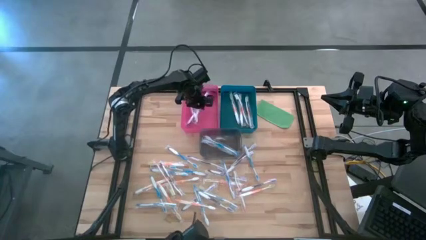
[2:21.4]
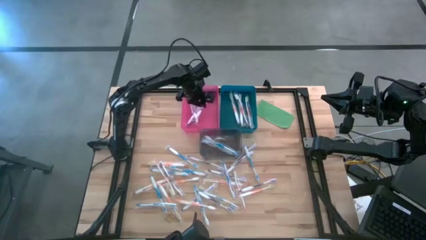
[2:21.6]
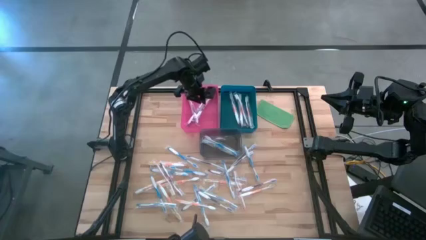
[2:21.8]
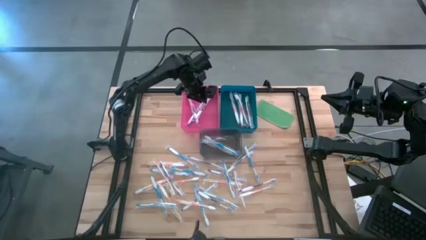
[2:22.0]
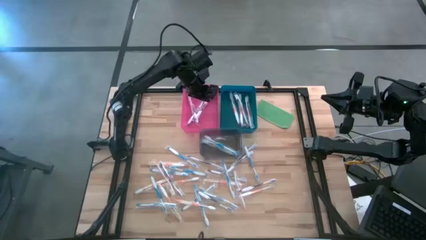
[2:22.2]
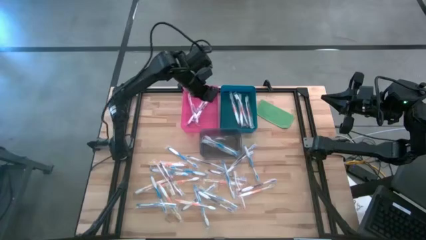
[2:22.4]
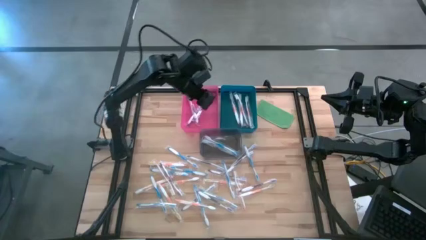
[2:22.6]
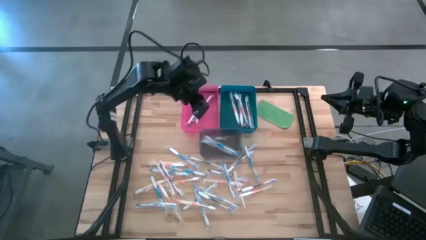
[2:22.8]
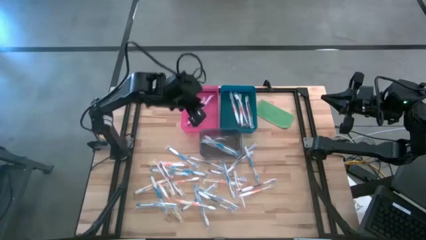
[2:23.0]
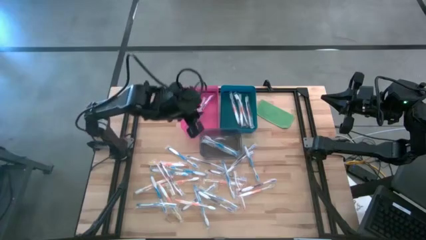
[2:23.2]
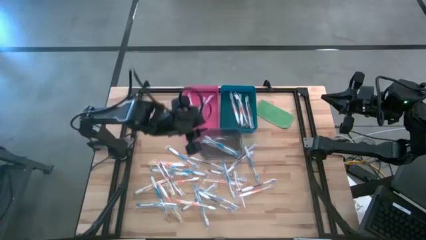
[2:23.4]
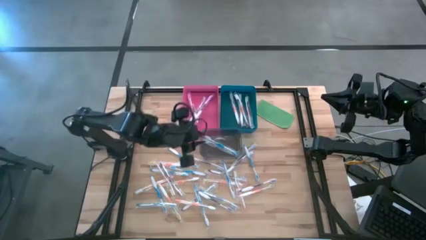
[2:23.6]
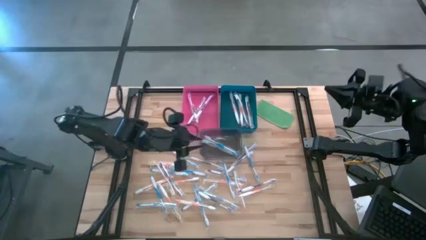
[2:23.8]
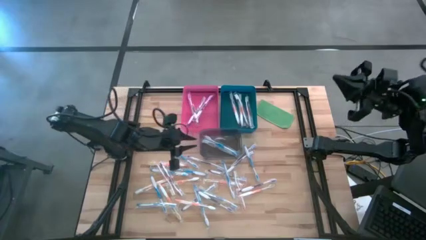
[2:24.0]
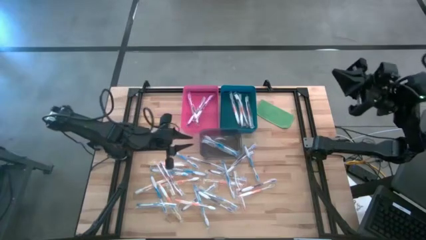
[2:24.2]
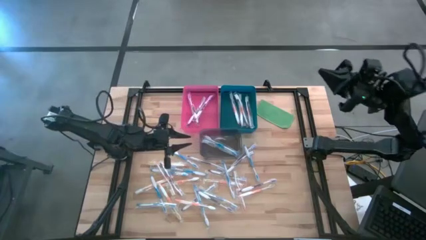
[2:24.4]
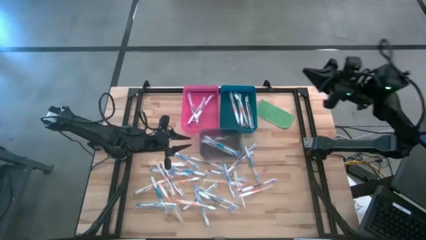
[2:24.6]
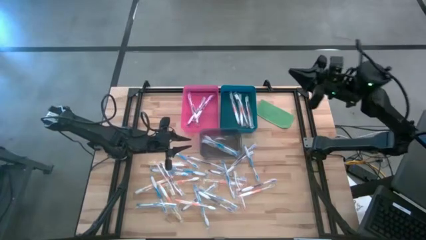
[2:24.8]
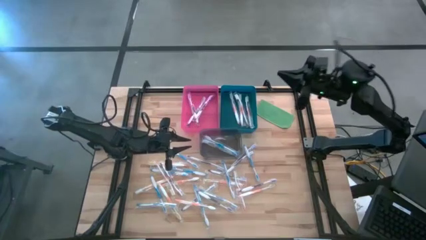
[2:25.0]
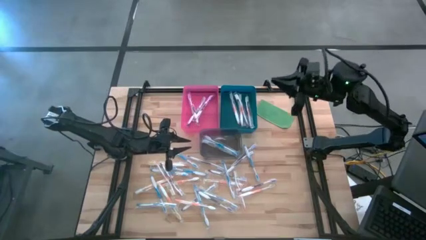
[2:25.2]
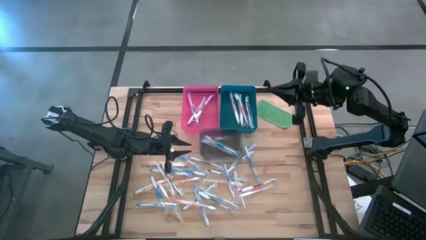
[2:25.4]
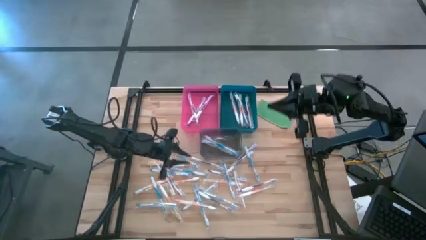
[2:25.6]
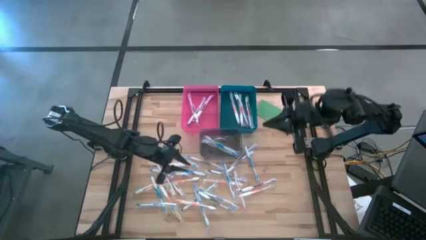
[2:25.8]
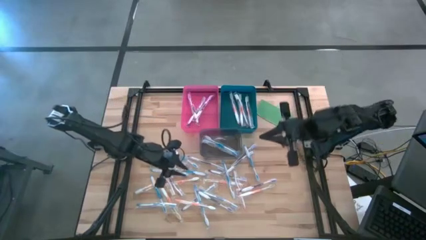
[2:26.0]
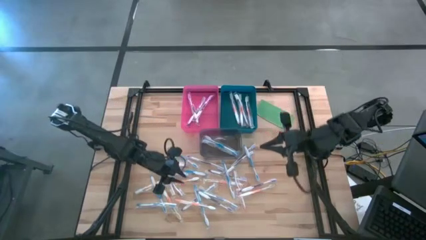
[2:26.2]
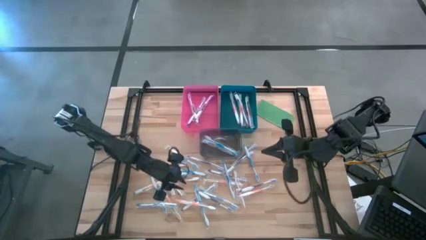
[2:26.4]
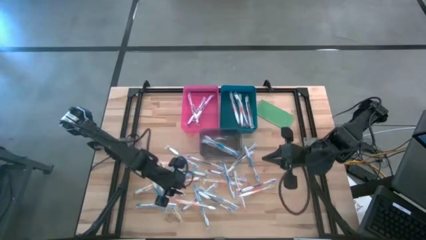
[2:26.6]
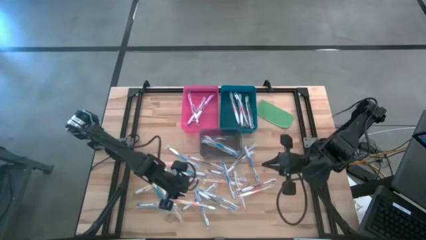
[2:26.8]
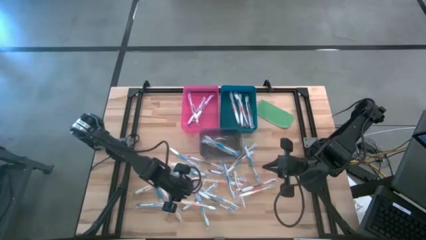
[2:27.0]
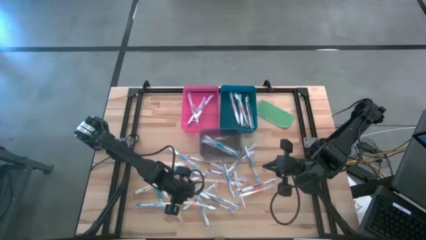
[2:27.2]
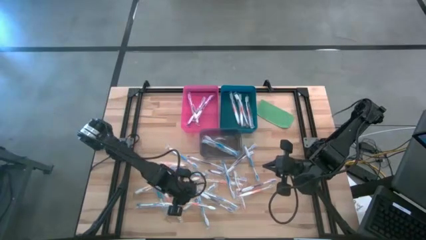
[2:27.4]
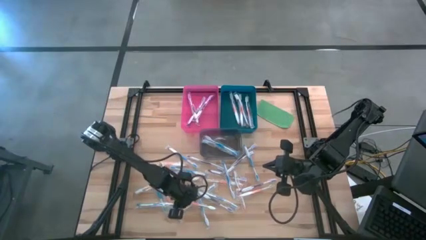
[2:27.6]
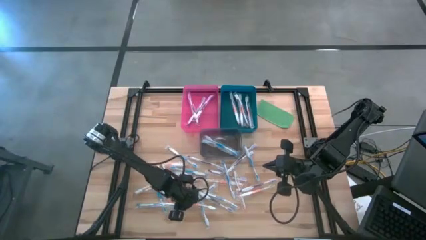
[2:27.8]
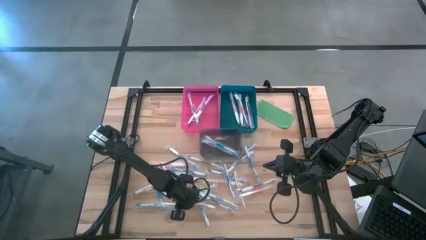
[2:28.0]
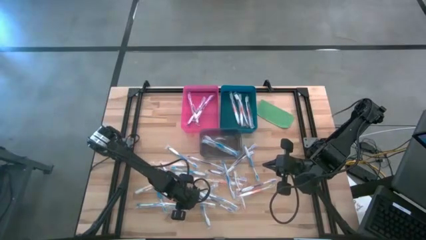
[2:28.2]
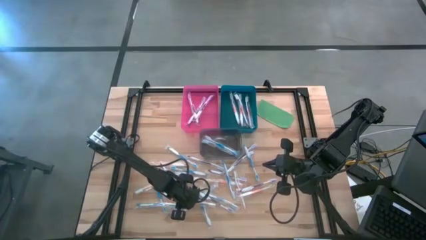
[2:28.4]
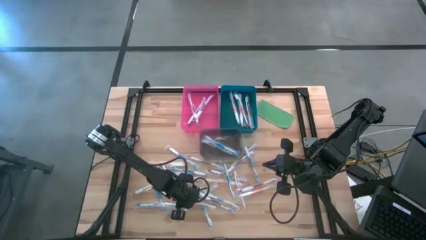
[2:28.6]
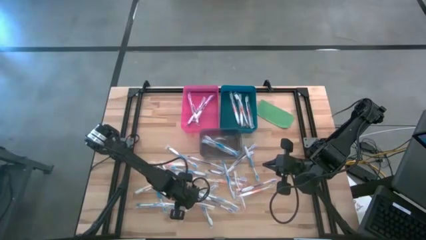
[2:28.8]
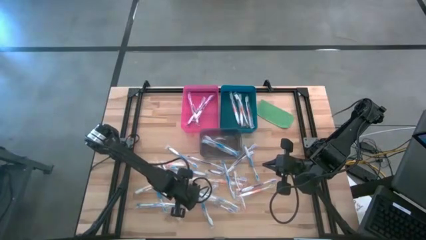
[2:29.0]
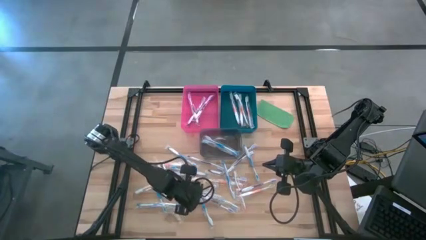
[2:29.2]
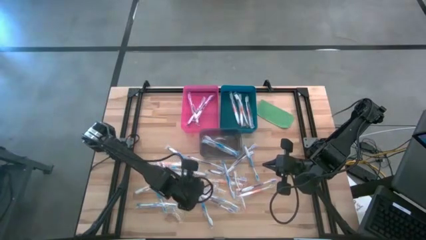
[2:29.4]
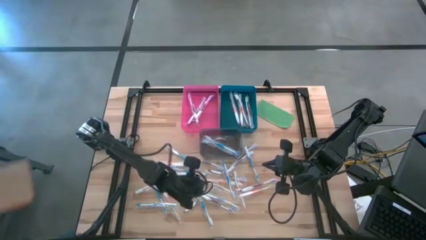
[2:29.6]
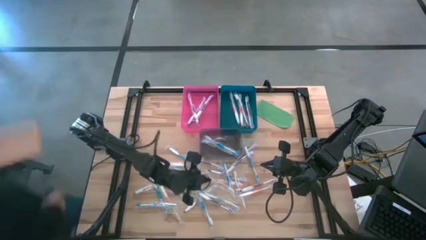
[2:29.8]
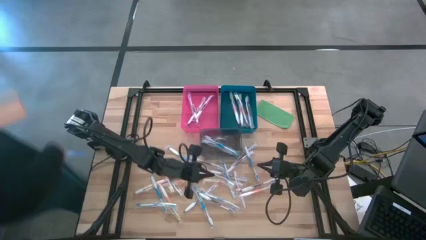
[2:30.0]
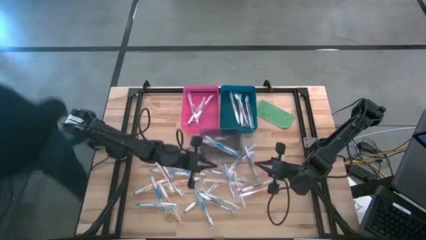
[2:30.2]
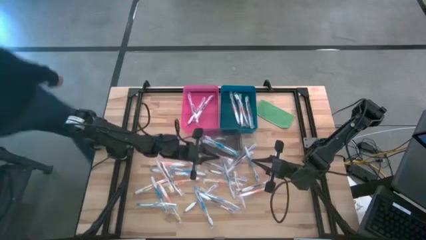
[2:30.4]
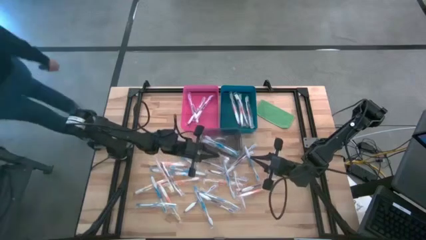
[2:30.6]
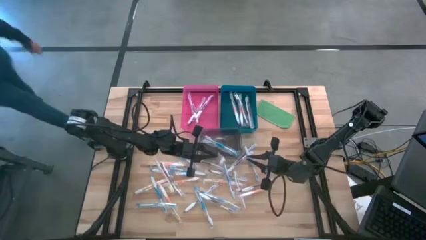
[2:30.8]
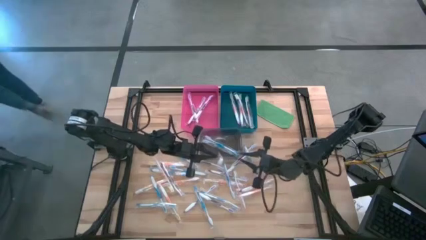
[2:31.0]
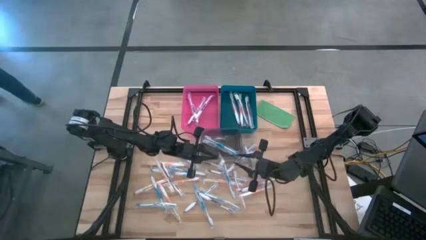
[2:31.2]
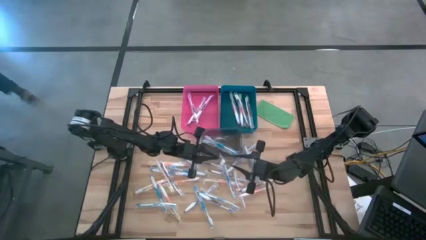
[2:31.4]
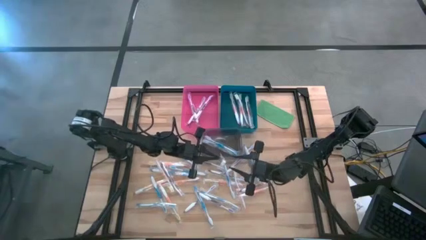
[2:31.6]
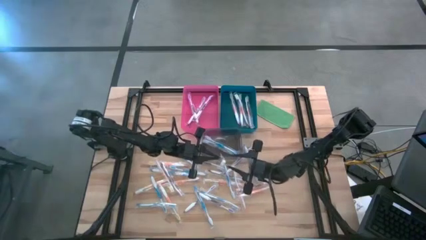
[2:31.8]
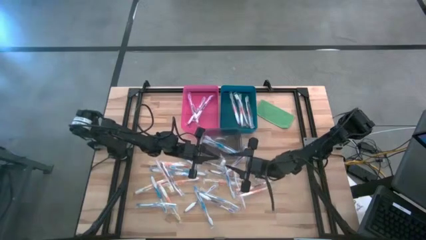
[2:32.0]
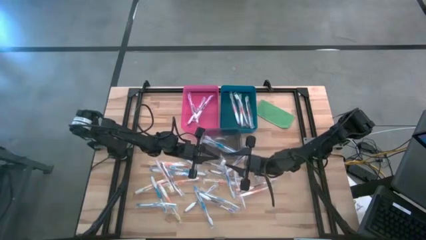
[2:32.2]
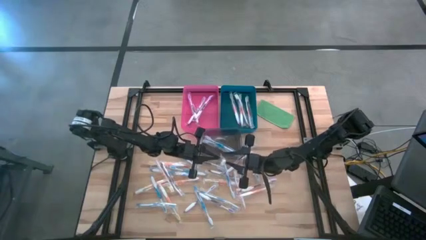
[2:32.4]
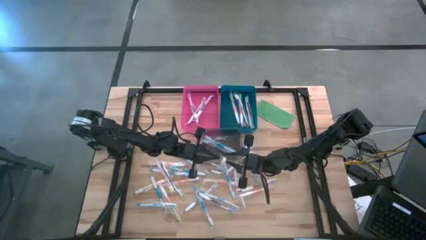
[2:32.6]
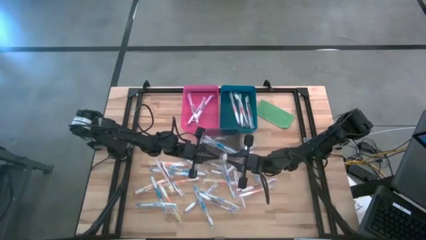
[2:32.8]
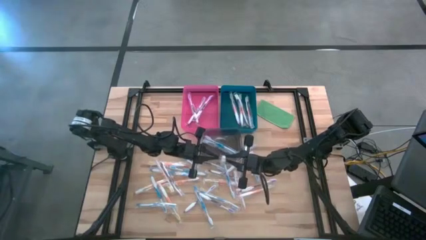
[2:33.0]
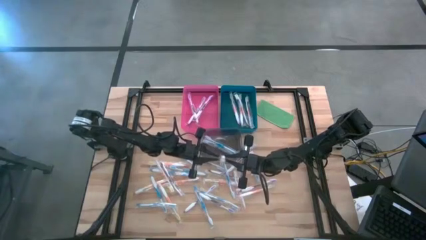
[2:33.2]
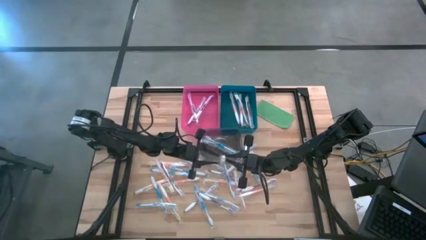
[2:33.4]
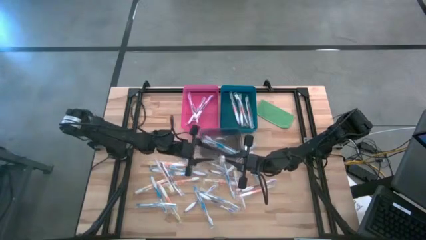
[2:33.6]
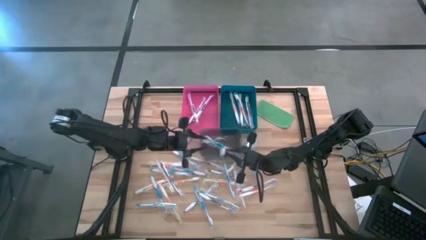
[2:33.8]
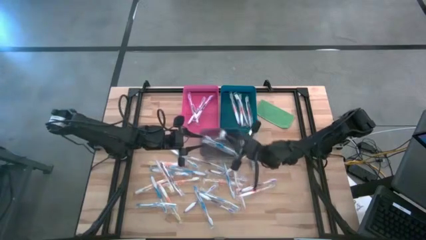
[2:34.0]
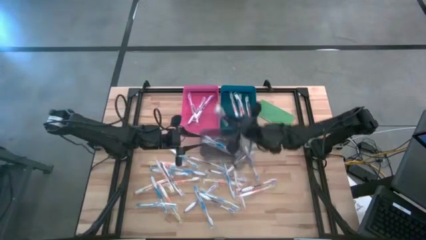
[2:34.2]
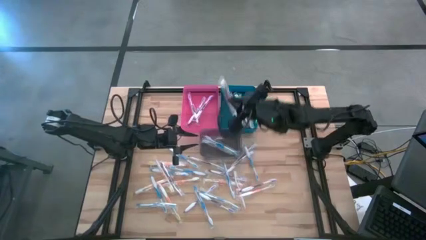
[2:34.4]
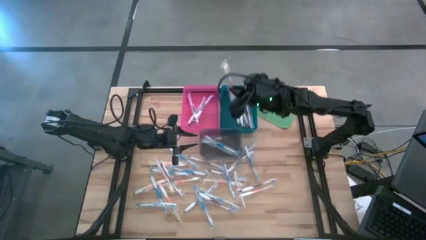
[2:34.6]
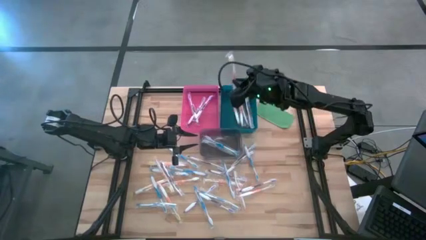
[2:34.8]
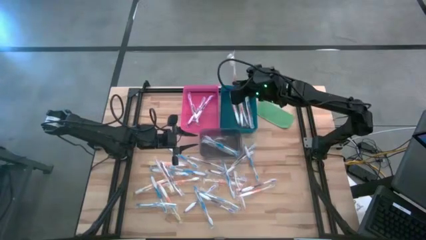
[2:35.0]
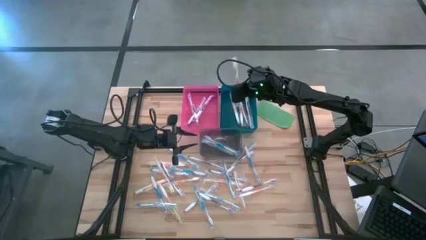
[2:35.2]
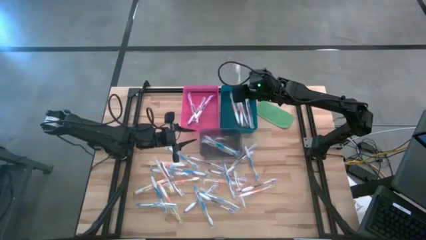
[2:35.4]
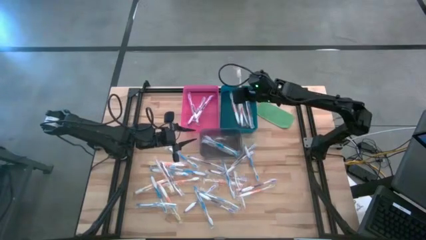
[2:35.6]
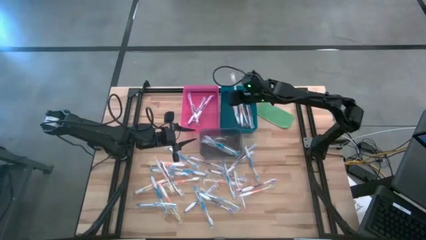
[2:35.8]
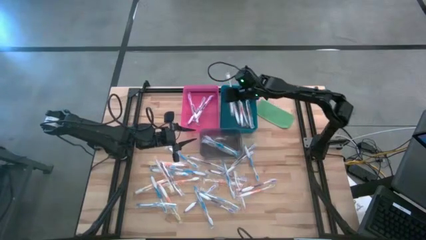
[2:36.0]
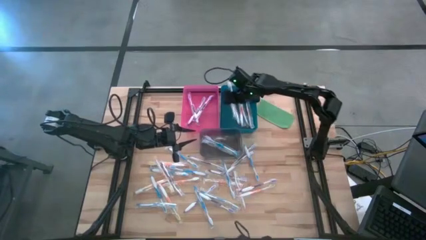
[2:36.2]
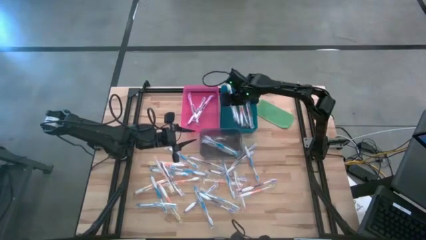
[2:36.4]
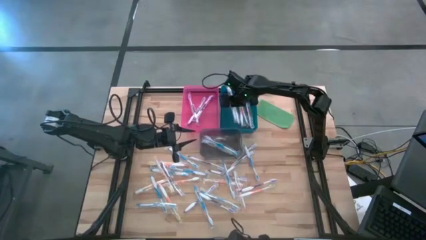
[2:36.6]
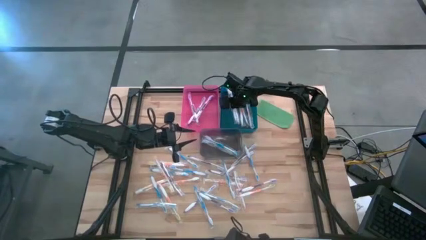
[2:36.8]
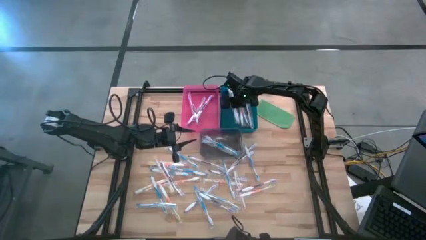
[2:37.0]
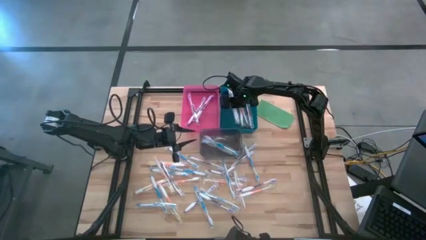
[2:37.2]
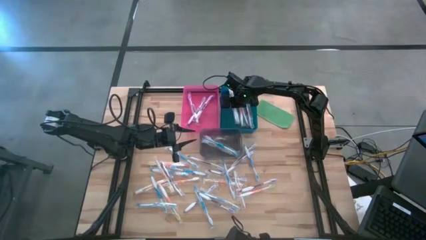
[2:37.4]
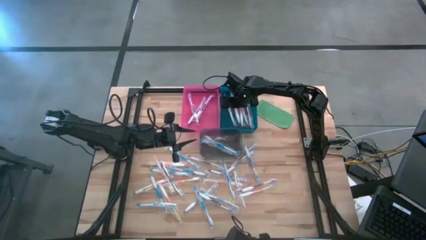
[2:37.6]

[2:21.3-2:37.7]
Task: Pick & Place Toothbrushes
Put the orange toothbrush into the blue bin

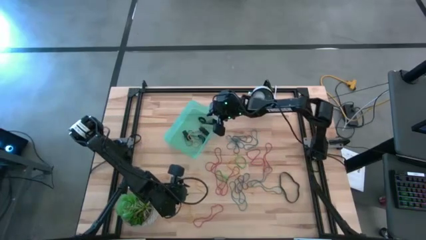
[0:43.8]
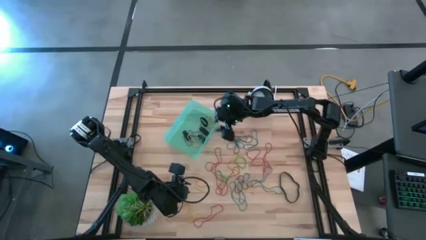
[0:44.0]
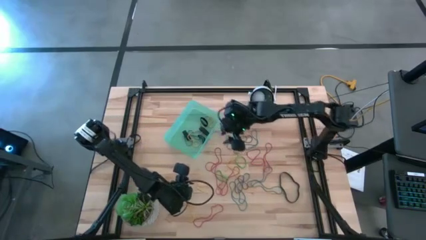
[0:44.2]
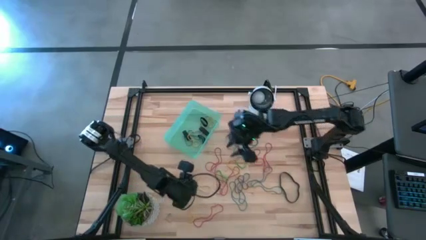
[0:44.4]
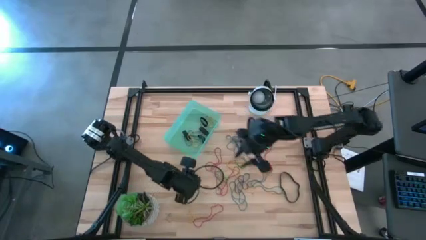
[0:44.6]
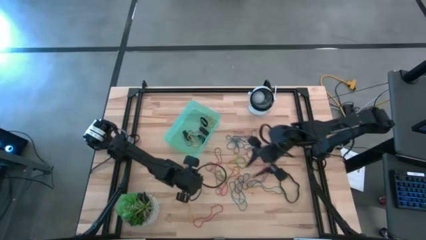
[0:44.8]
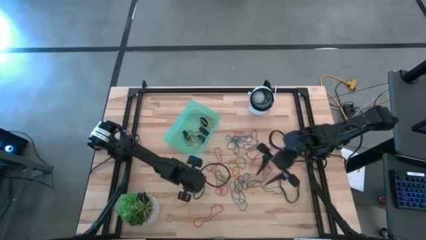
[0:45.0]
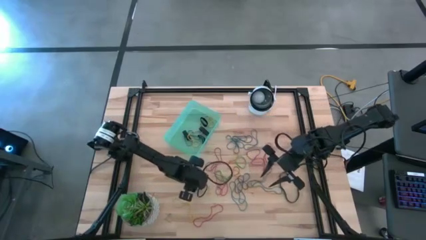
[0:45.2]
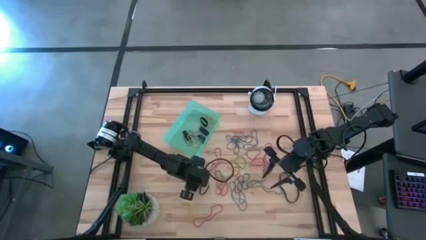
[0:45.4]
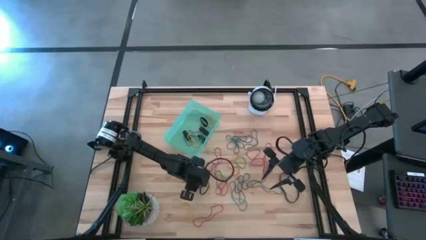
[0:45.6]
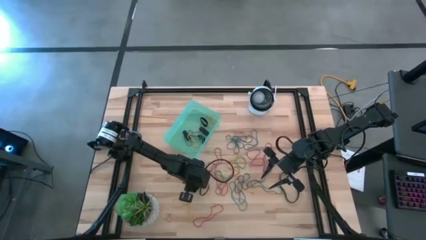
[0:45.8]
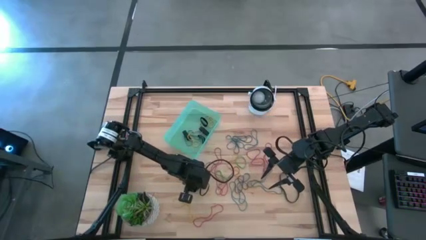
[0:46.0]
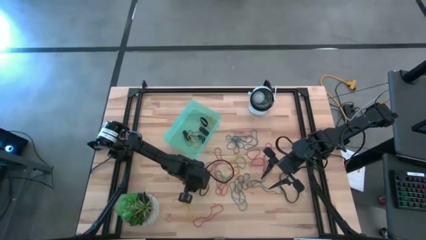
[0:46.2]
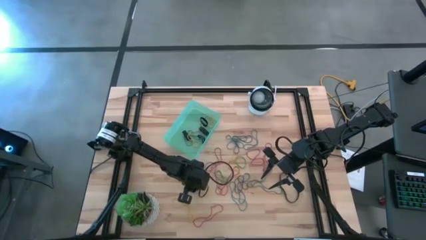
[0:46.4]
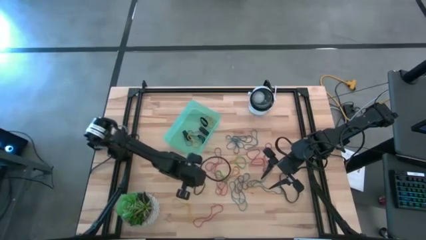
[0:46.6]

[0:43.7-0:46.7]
Task: Pick and place rubber bands into bin
Put the yellow rubber band into the green bin
